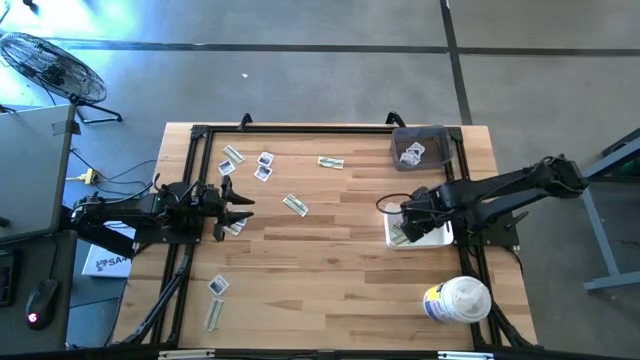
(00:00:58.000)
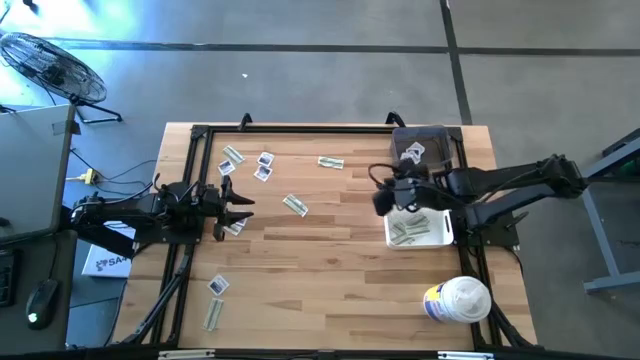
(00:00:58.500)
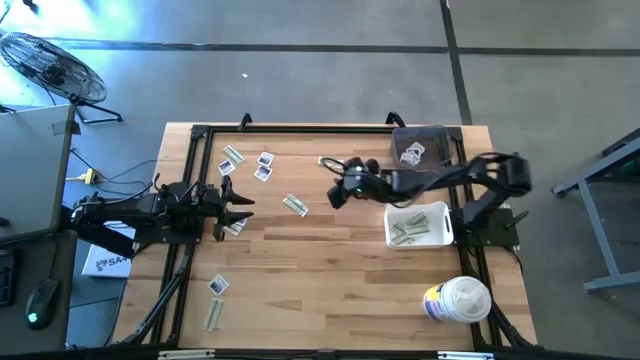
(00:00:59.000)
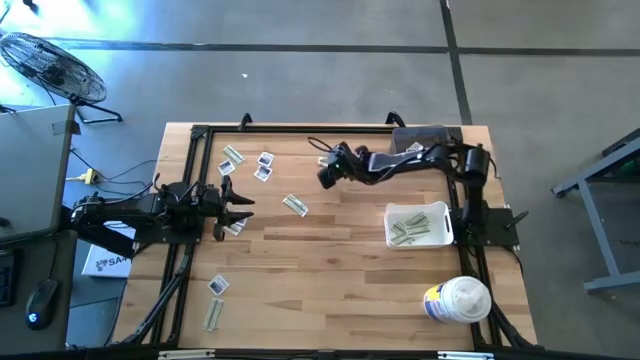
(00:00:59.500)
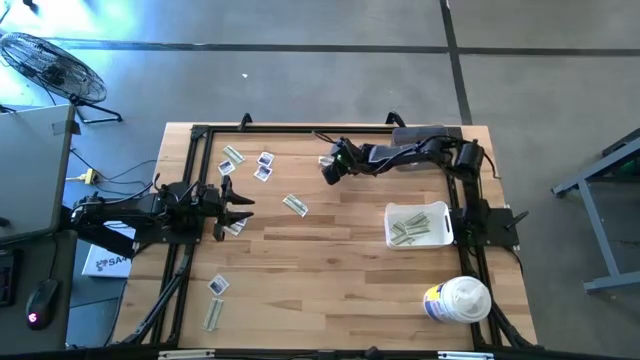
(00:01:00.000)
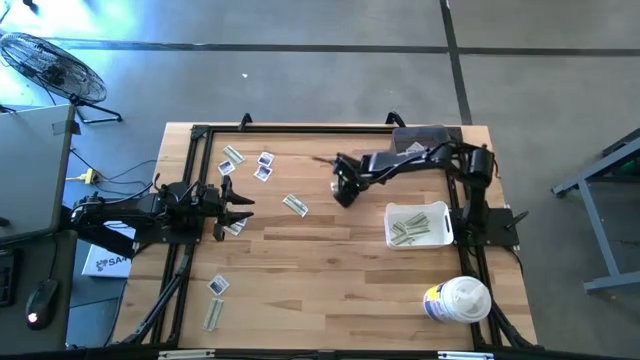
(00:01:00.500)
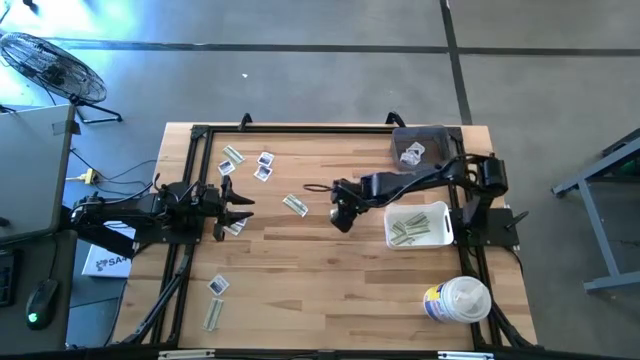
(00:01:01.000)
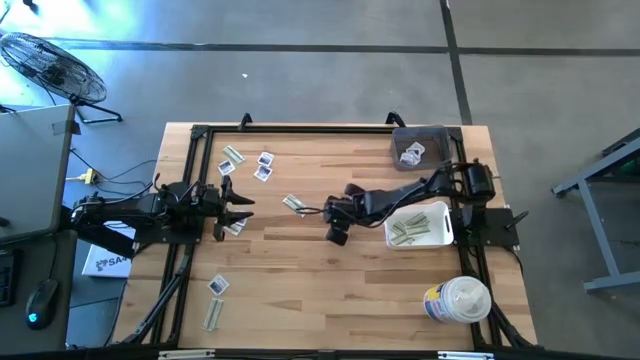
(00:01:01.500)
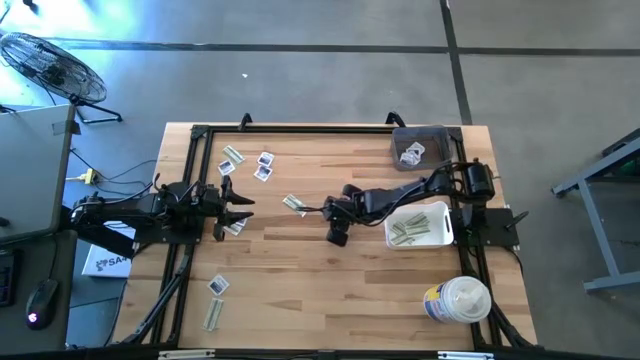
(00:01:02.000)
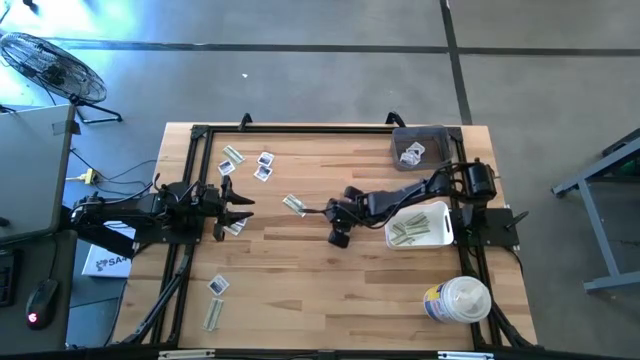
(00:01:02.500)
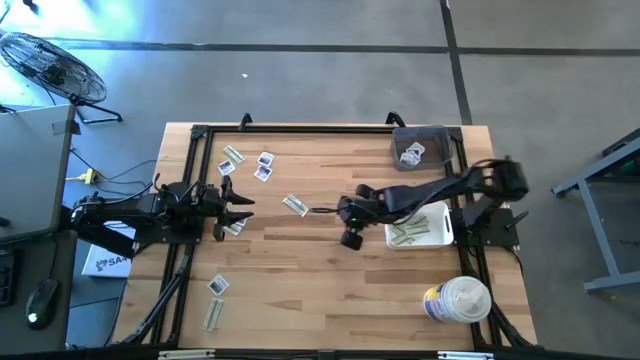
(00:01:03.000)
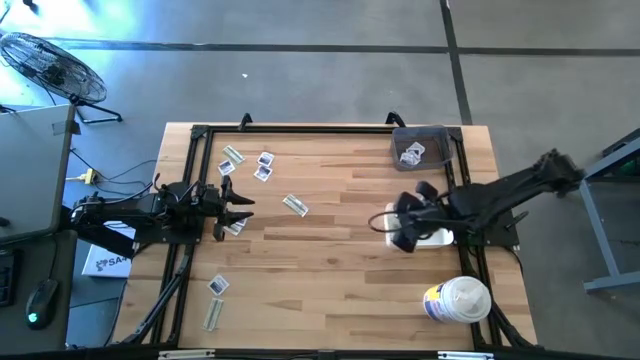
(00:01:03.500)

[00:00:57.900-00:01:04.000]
Task: Pick & Place First Aid Supplies
Put the bandage into the white bin

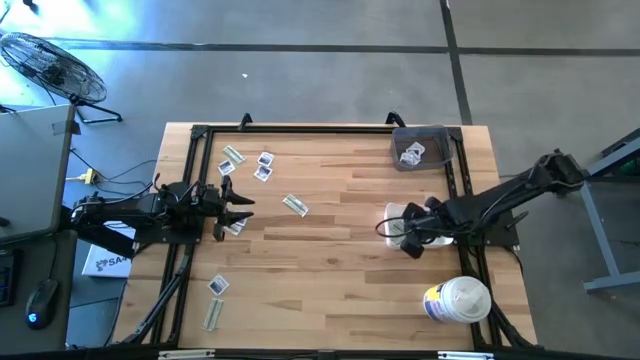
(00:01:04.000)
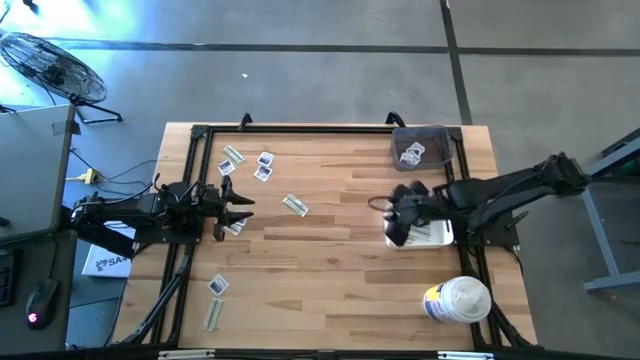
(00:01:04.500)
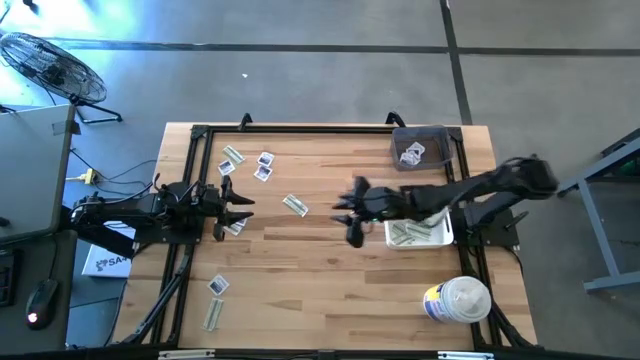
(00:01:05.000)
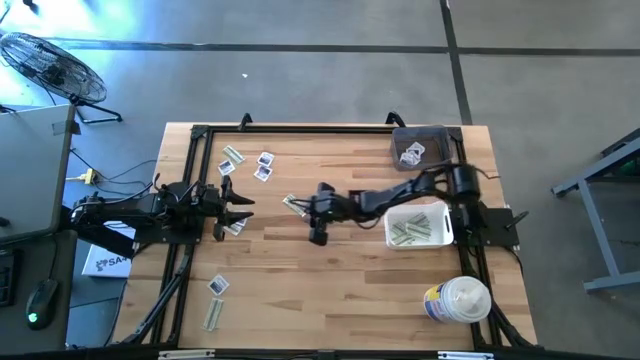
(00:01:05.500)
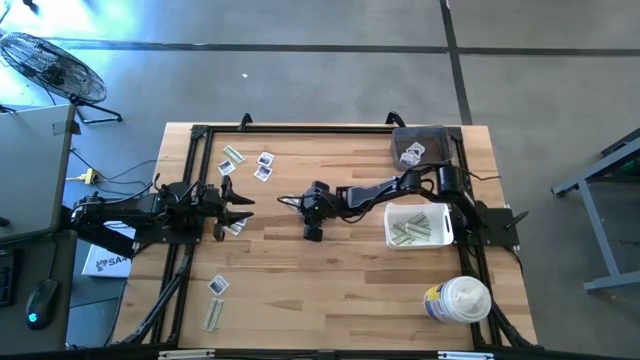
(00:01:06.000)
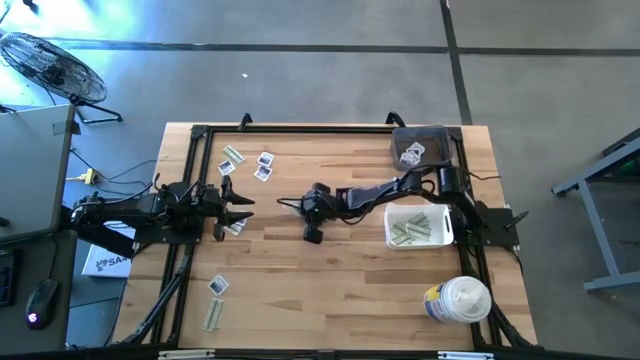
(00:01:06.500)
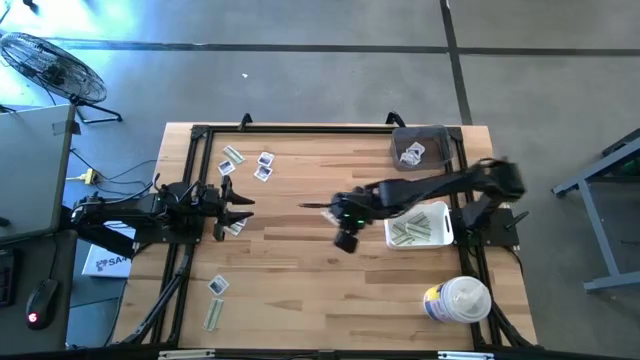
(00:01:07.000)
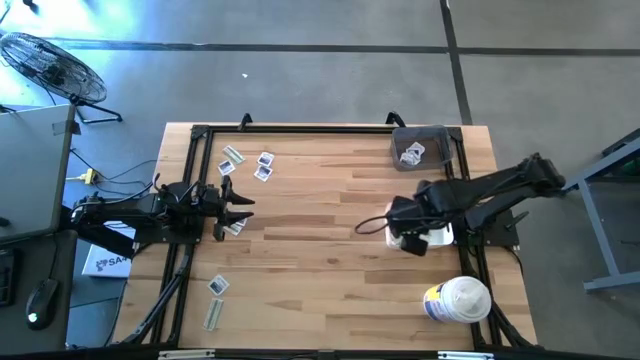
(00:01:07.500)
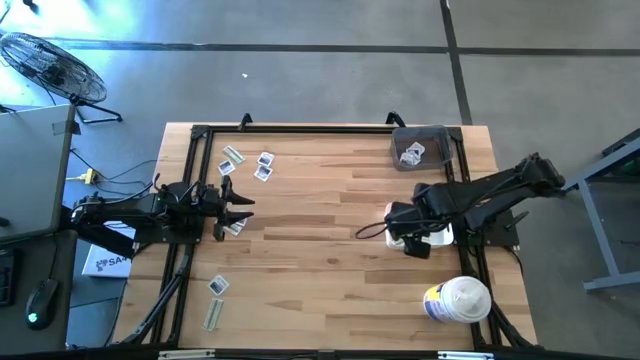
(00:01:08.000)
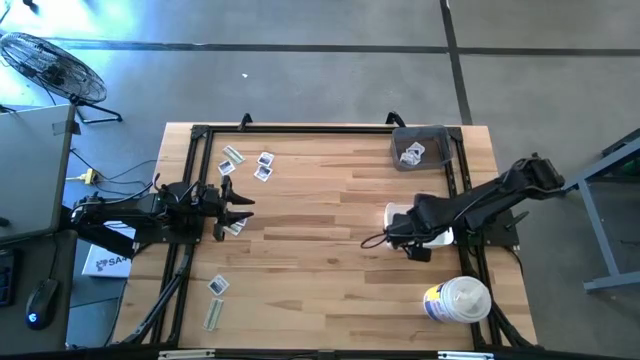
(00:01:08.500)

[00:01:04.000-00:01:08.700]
Put the bandage into the white bin

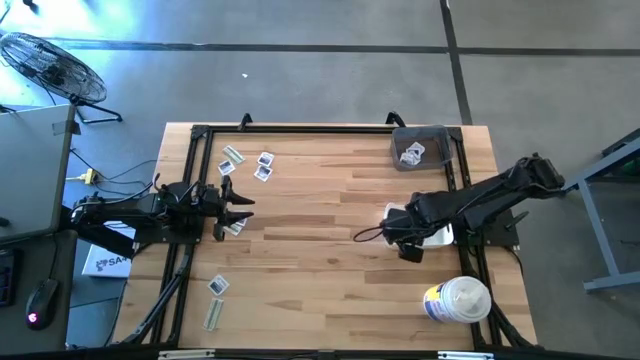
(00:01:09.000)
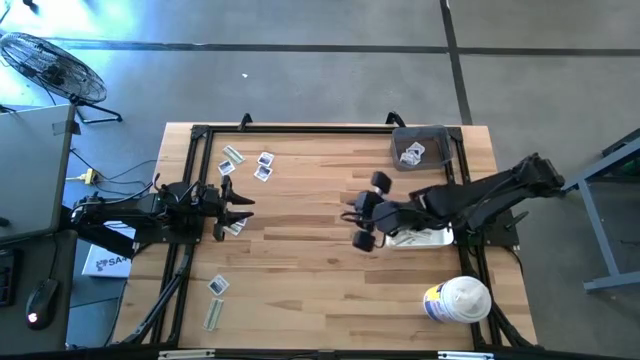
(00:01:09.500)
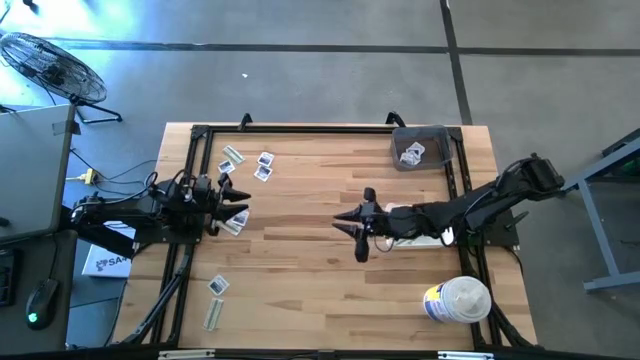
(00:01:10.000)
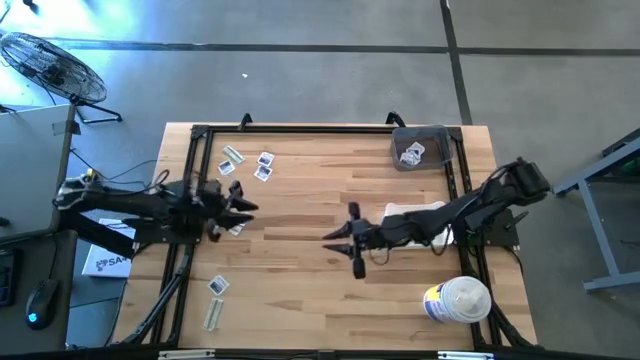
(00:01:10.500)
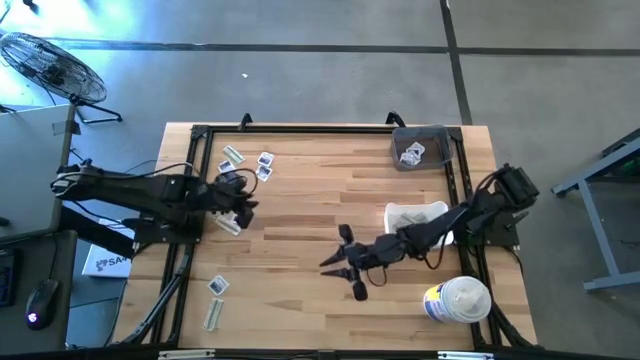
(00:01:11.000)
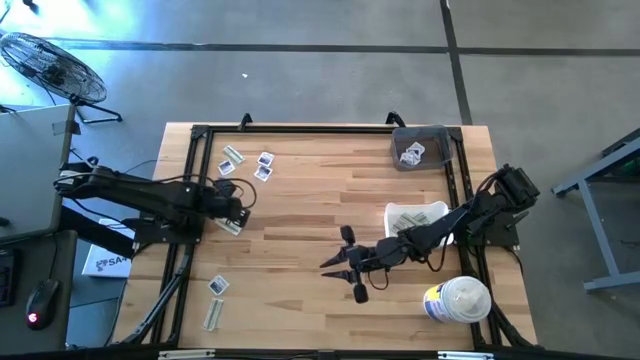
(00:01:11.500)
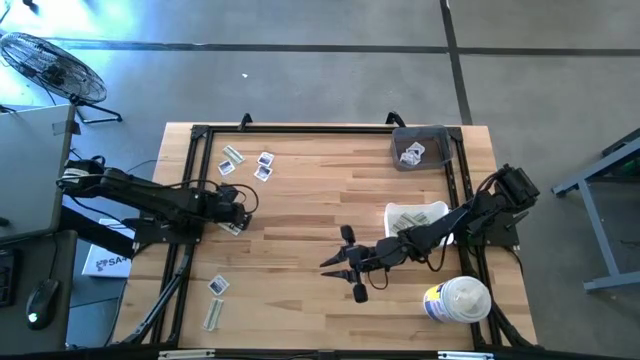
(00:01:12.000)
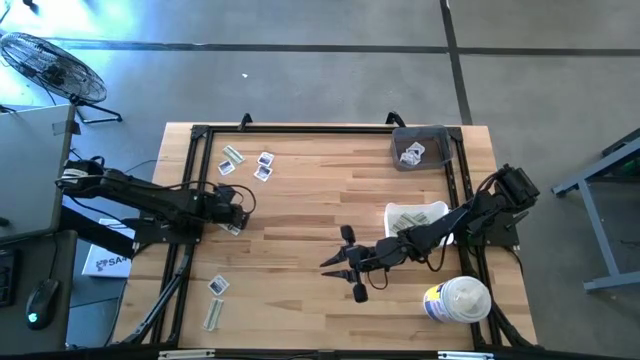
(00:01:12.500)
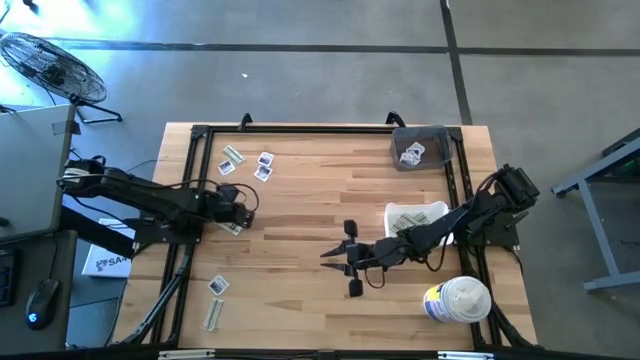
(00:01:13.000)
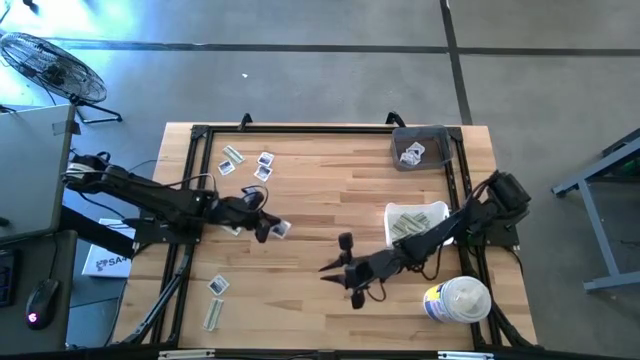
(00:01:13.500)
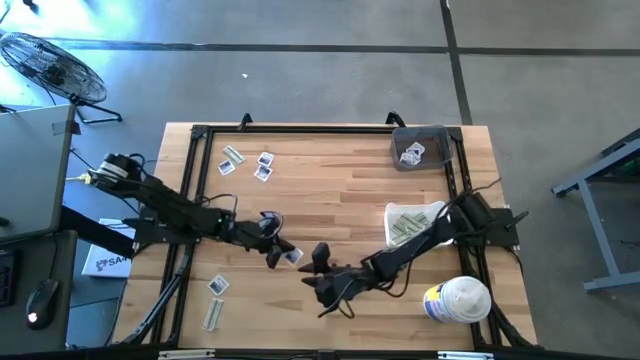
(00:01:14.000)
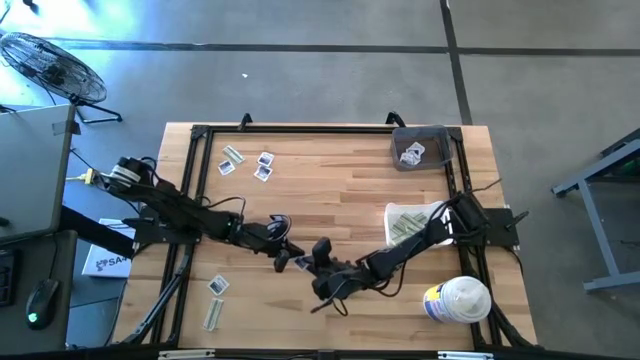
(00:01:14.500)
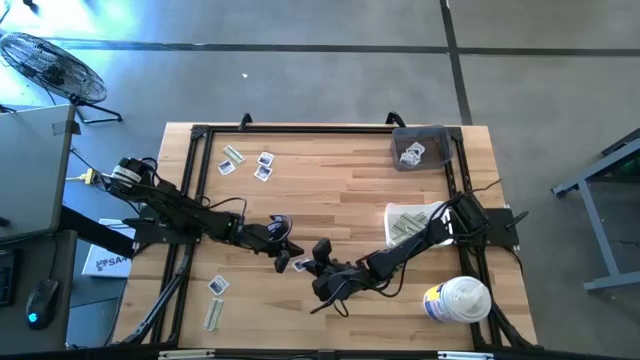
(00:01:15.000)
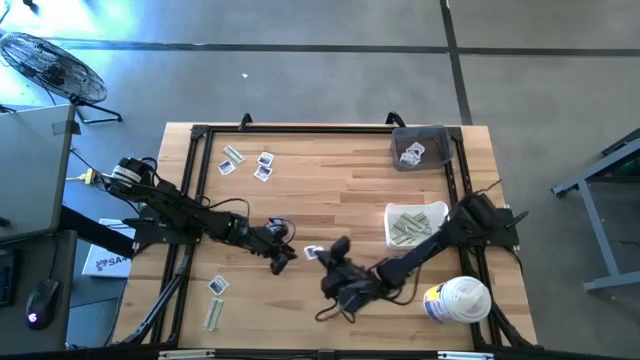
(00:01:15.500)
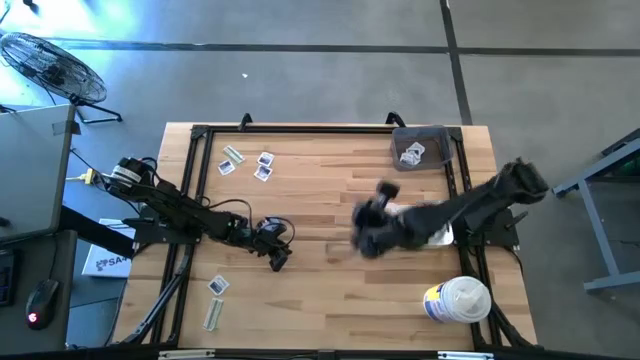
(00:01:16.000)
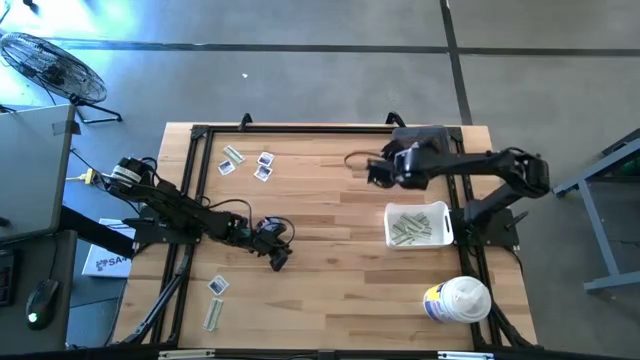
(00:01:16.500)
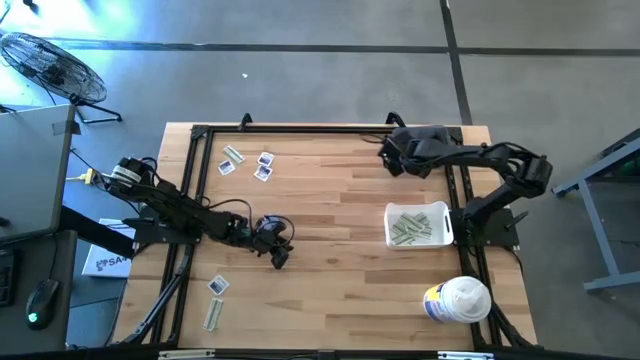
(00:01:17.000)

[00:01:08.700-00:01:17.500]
Put the alcohol pad into the black bin
